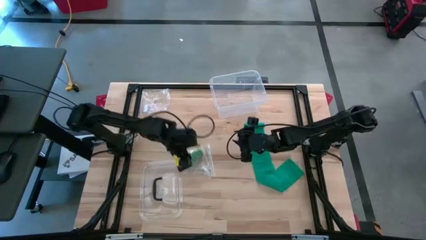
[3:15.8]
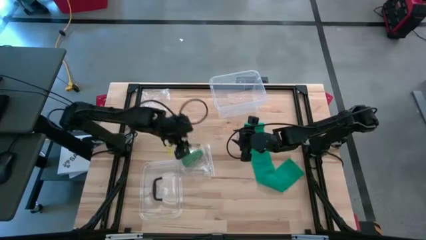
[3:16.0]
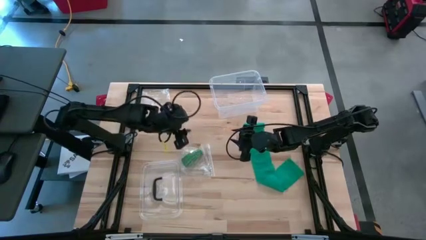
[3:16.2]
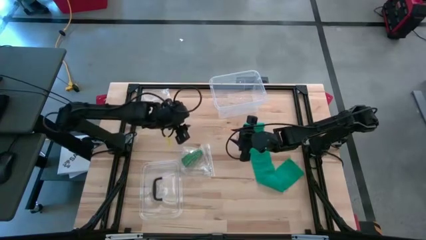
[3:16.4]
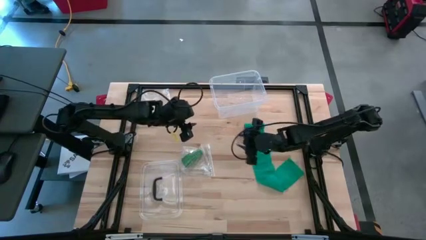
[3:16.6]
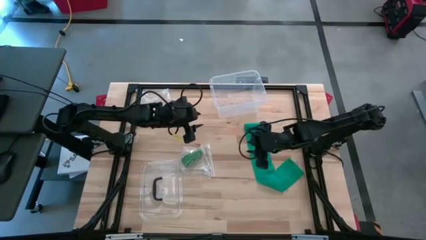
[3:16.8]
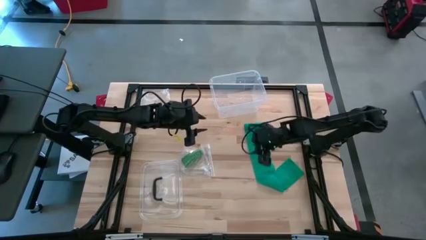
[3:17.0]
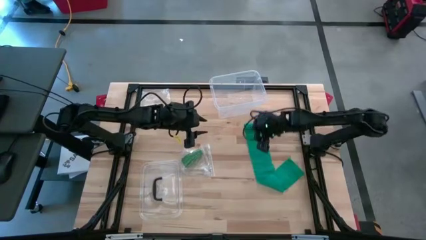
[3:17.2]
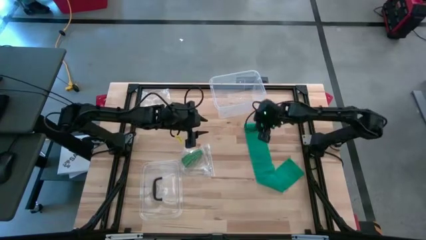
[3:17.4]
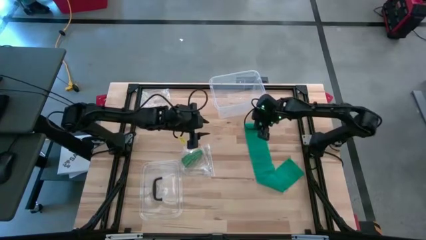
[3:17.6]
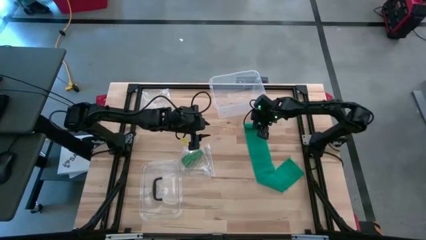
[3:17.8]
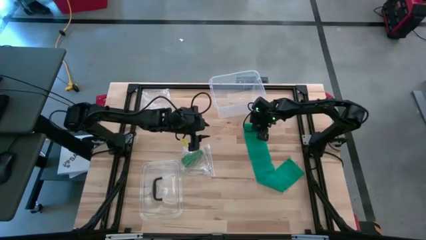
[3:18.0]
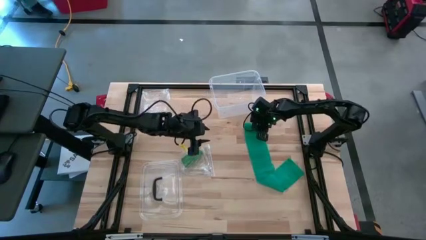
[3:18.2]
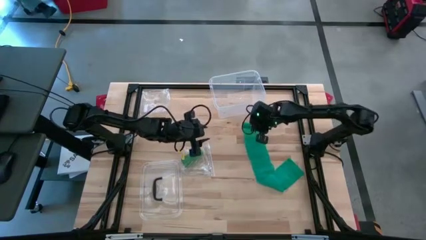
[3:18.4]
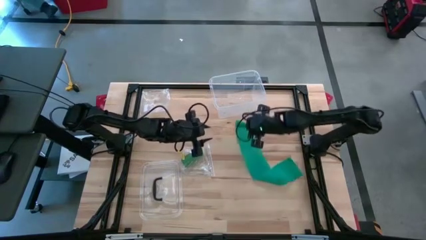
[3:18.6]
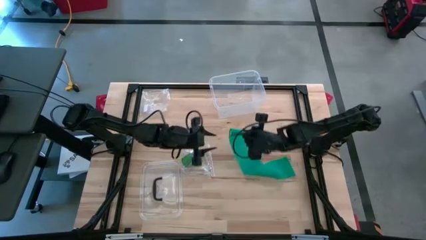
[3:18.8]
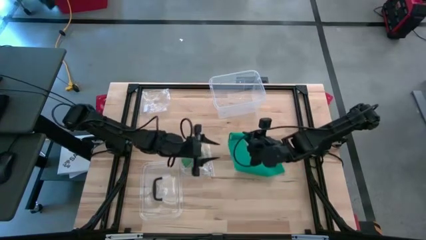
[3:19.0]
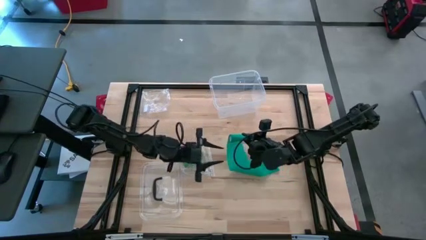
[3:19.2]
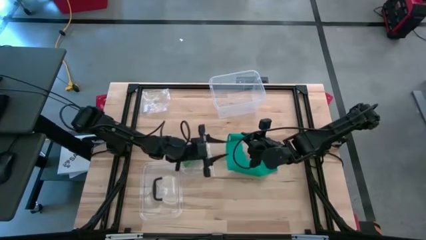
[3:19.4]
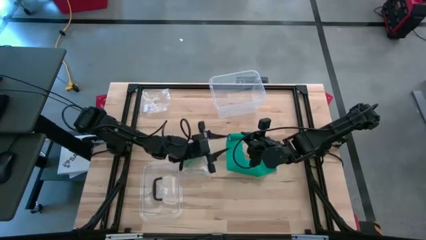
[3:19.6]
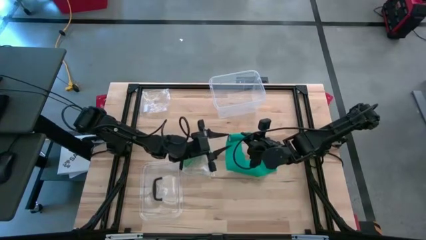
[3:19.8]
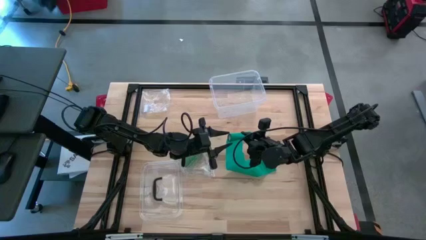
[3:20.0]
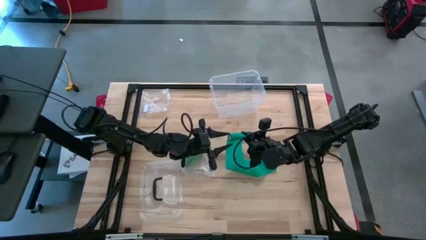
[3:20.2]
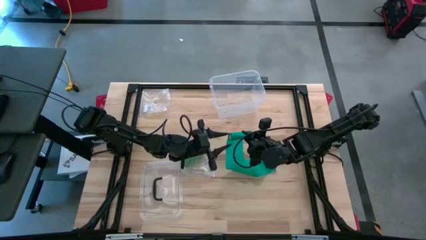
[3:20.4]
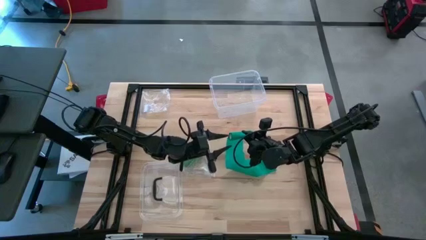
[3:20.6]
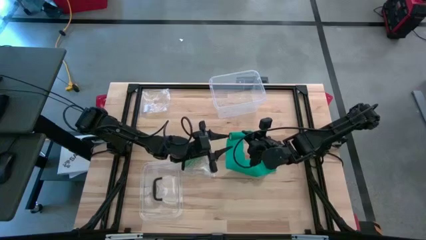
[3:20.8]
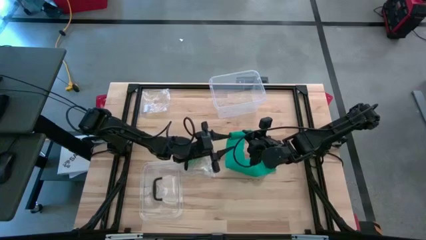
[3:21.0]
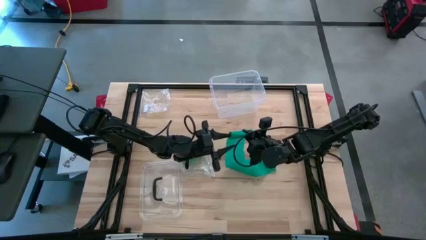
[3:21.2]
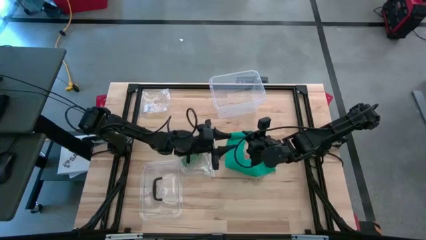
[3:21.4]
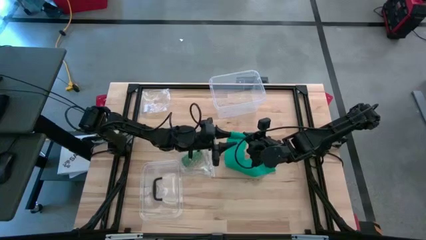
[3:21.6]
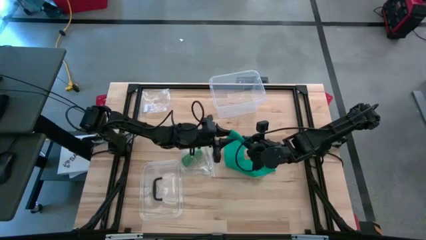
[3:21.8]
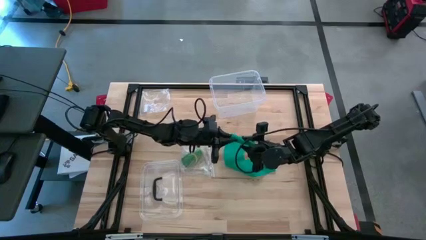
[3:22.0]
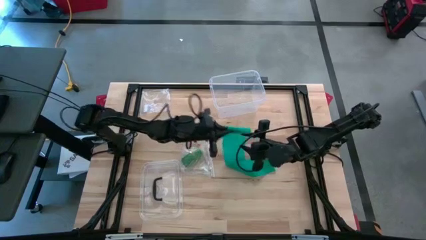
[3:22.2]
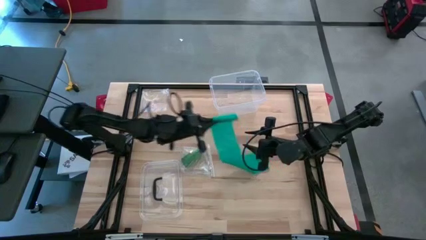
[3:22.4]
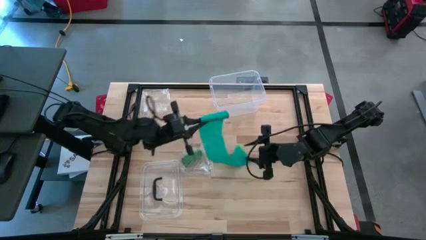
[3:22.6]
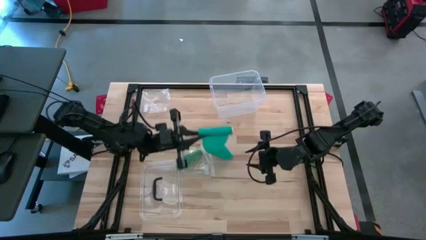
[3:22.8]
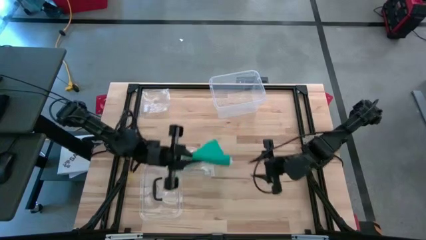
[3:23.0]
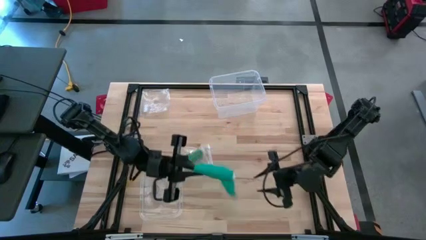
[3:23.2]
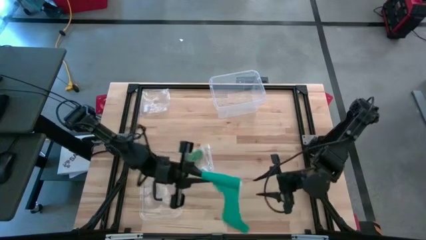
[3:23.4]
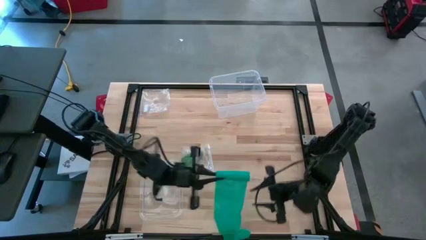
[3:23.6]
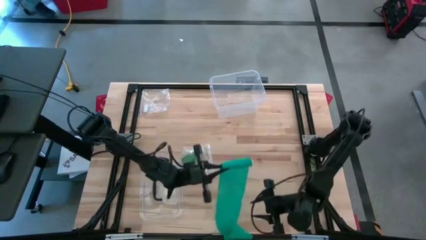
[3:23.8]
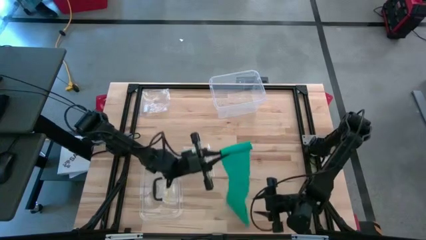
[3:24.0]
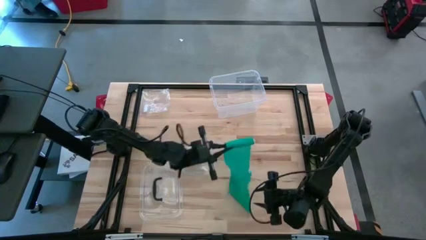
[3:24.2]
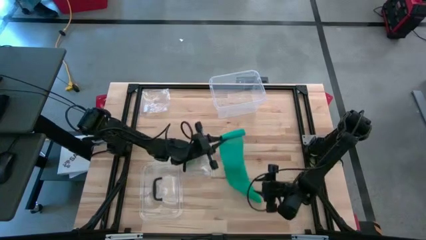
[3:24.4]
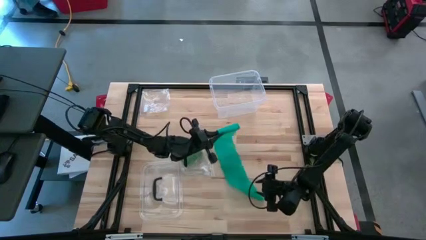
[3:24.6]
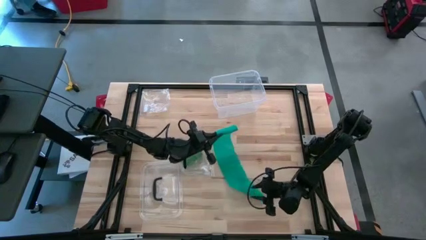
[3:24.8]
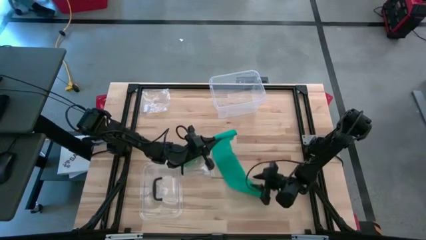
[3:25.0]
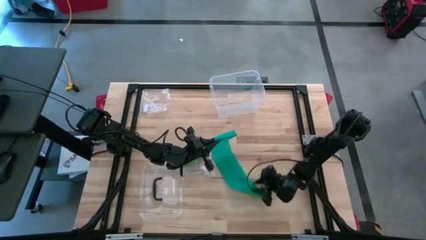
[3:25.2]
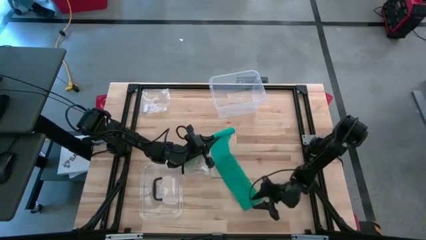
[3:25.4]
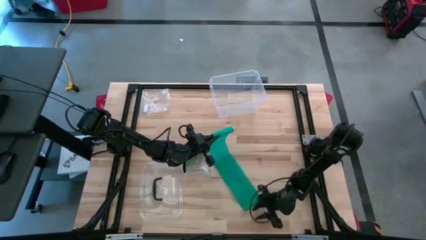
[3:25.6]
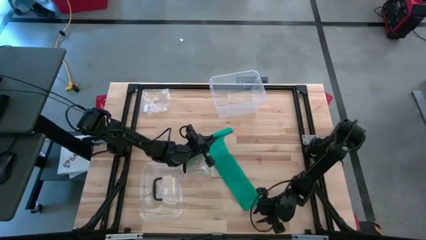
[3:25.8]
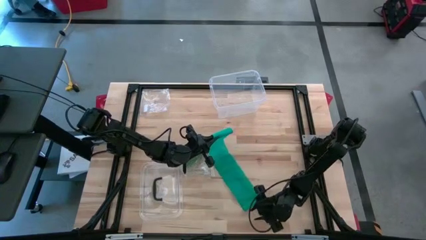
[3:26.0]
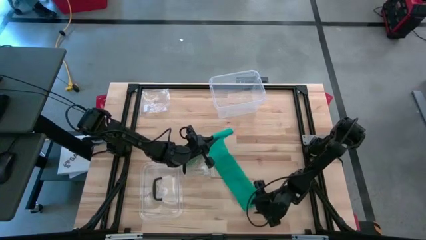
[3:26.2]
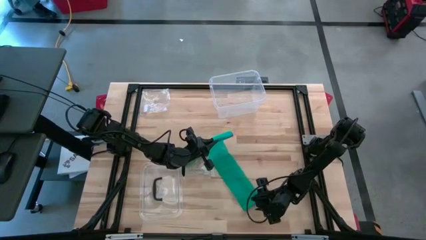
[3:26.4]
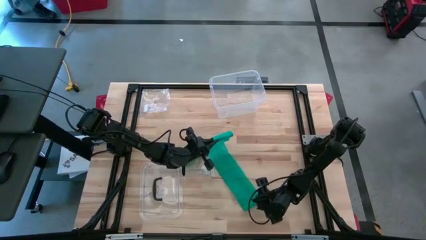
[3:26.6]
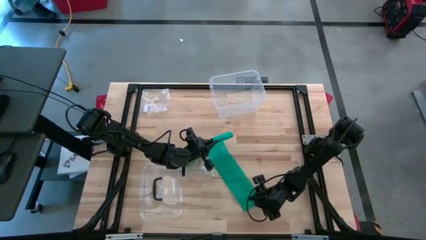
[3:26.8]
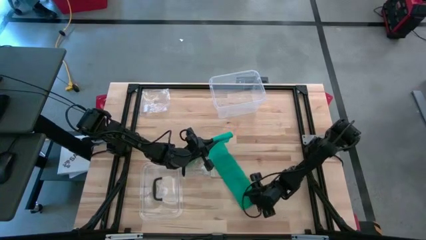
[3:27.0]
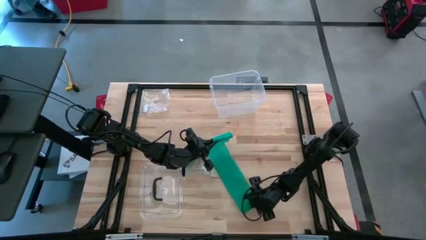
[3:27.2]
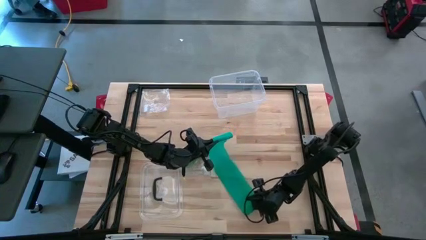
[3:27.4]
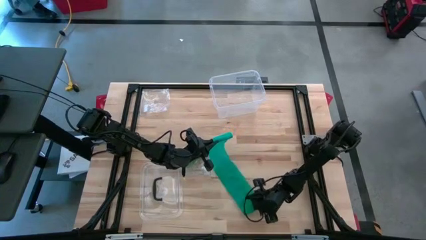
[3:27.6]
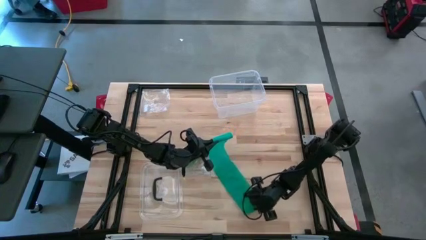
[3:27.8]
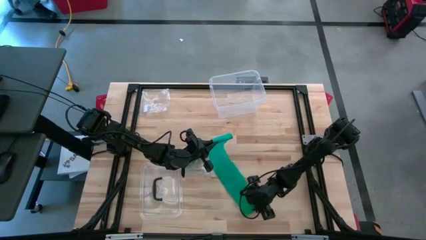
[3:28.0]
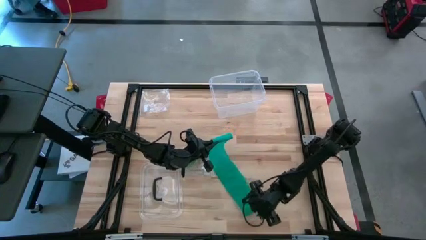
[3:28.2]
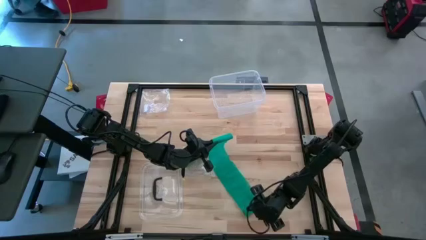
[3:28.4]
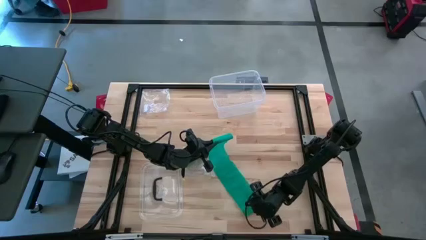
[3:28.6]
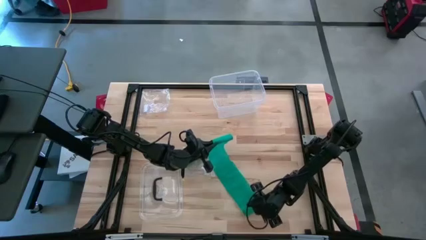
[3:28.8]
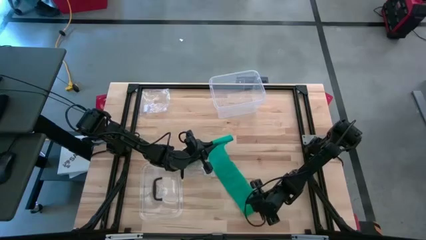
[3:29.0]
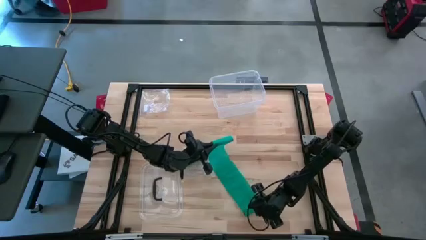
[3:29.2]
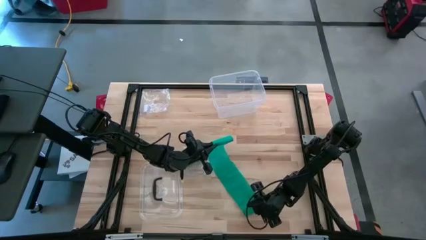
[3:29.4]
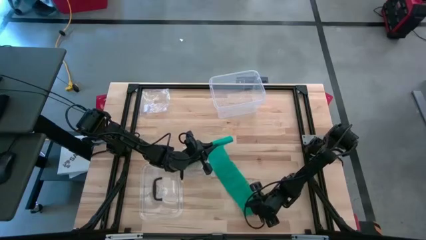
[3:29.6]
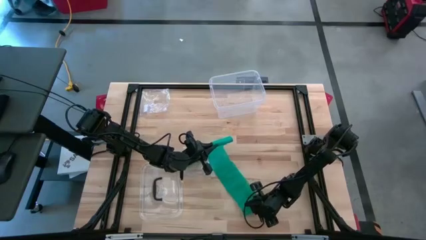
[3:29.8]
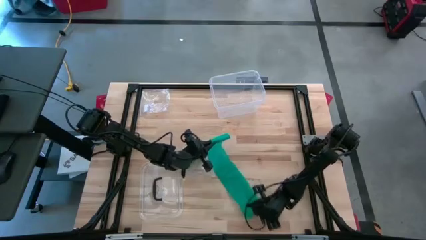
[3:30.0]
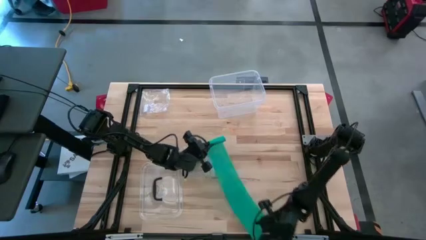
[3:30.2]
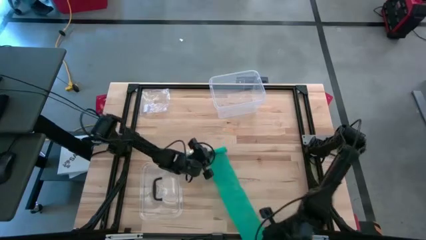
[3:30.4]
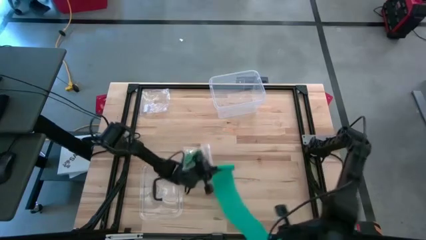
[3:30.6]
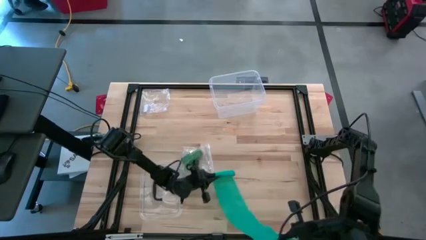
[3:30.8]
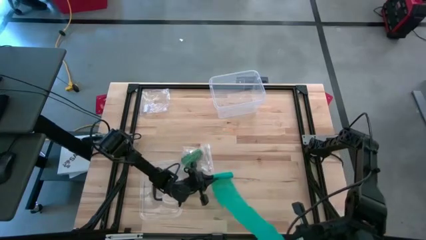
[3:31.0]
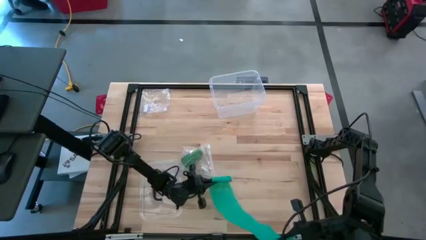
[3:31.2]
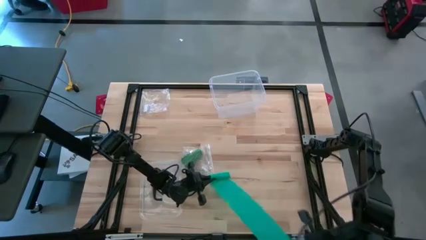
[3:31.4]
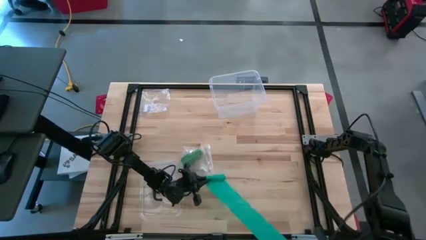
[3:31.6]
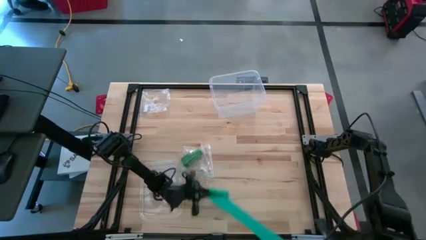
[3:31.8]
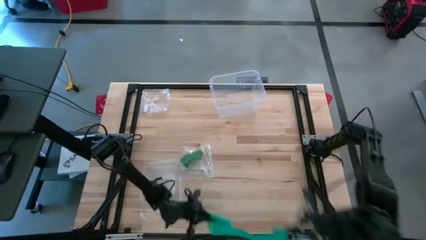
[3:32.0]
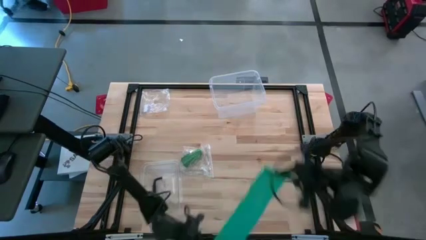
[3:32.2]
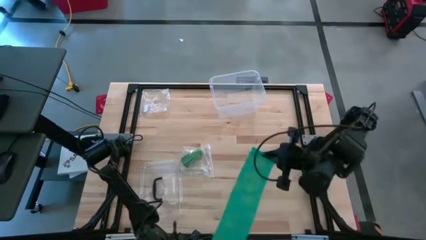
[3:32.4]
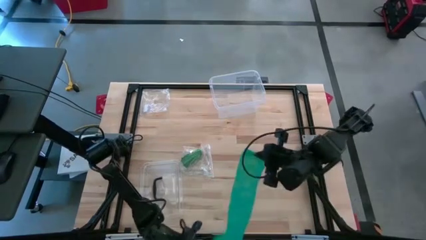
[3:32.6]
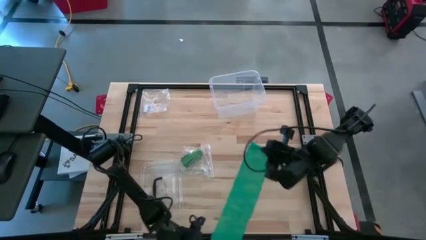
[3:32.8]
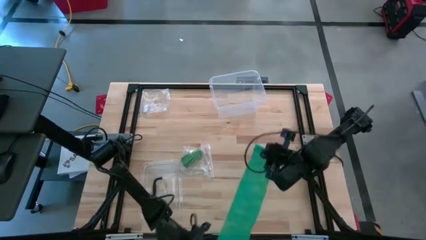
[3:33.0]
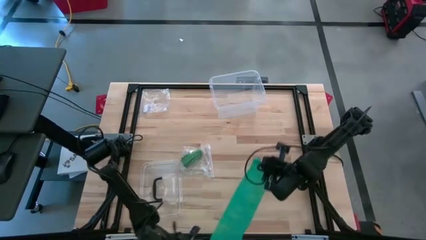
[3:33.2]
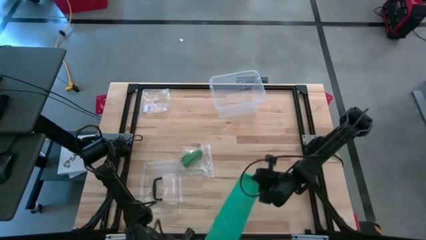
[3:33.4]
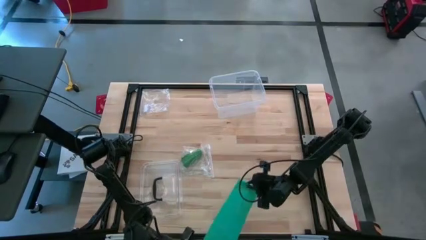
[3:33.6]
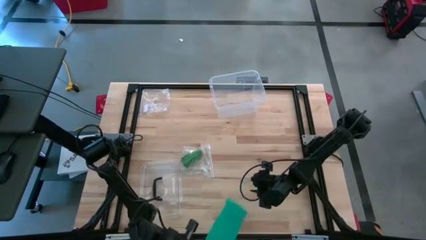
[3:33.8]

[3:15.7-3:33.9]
Task: Roll bandage
Roll the blue bandage
